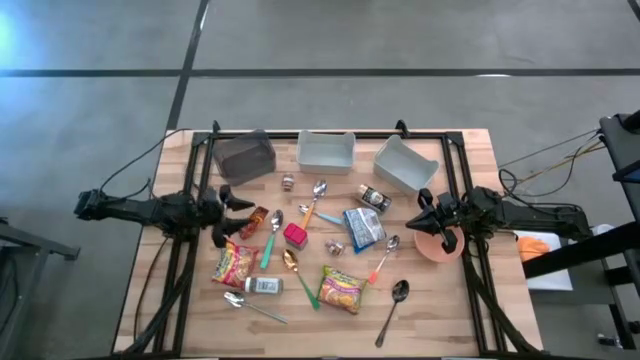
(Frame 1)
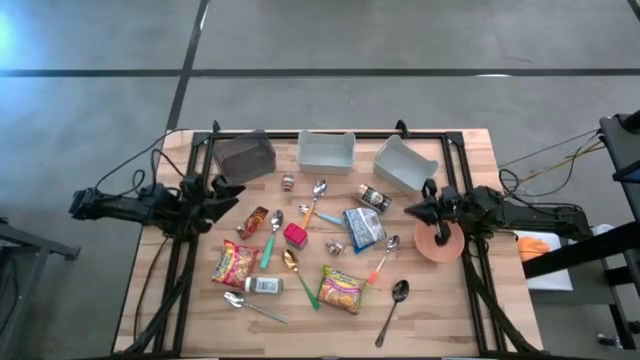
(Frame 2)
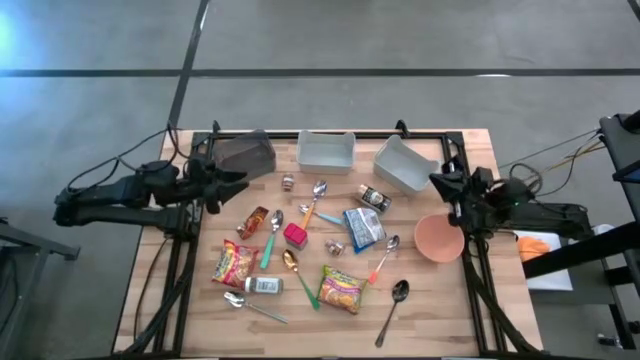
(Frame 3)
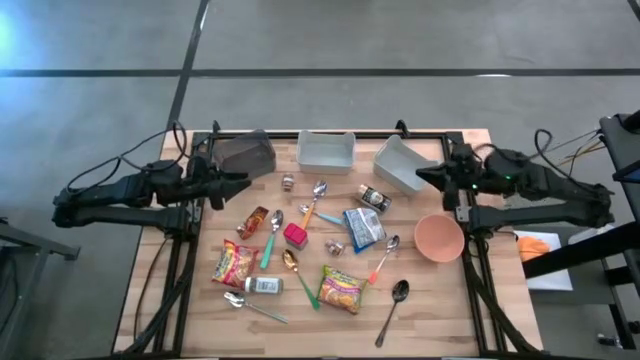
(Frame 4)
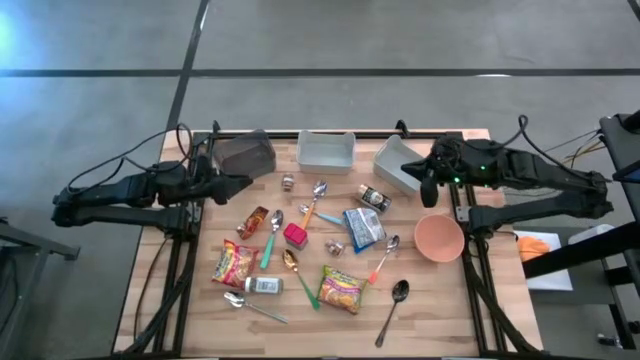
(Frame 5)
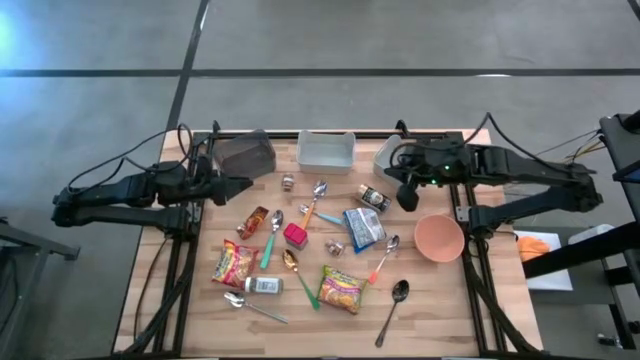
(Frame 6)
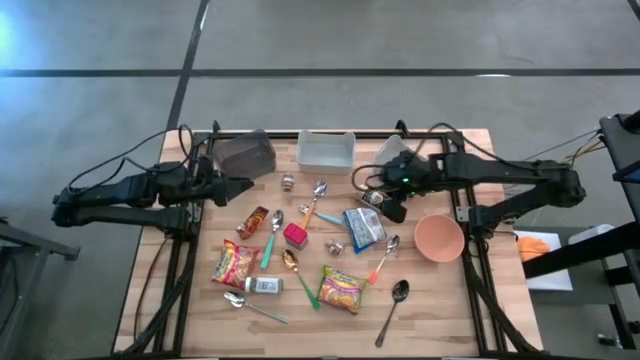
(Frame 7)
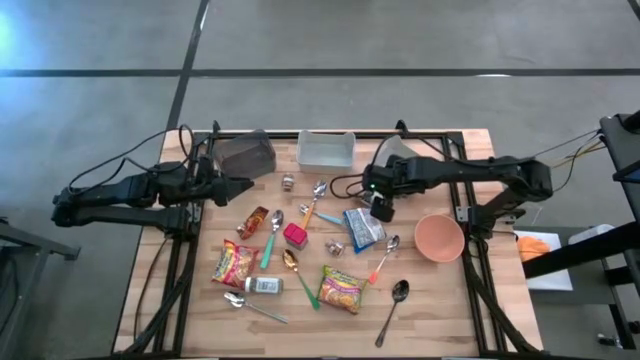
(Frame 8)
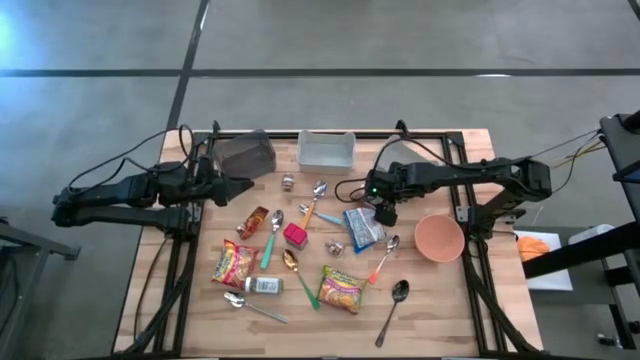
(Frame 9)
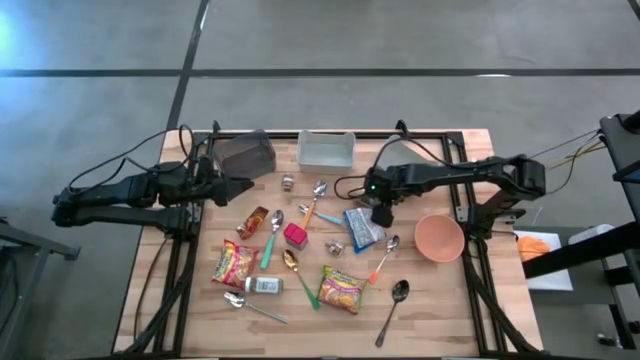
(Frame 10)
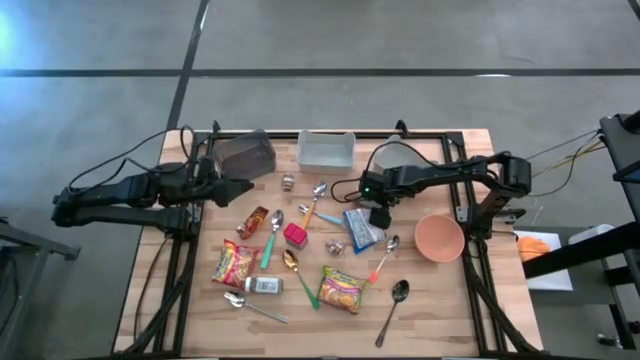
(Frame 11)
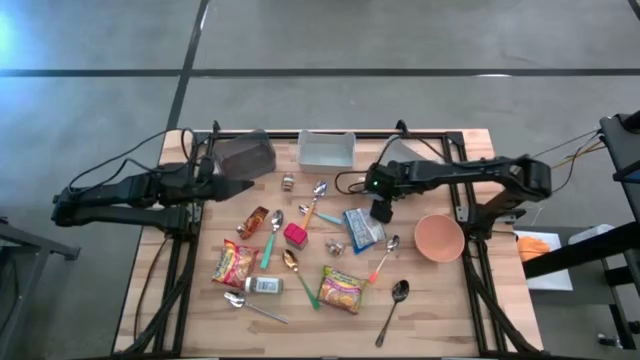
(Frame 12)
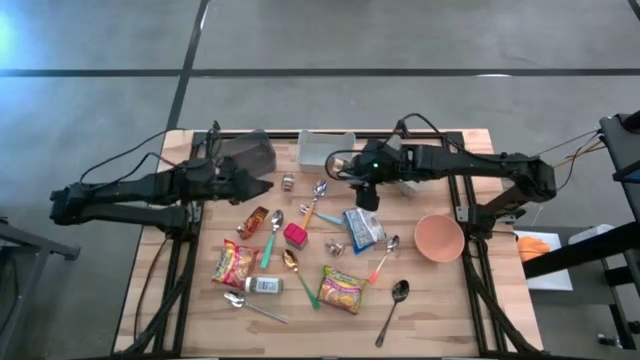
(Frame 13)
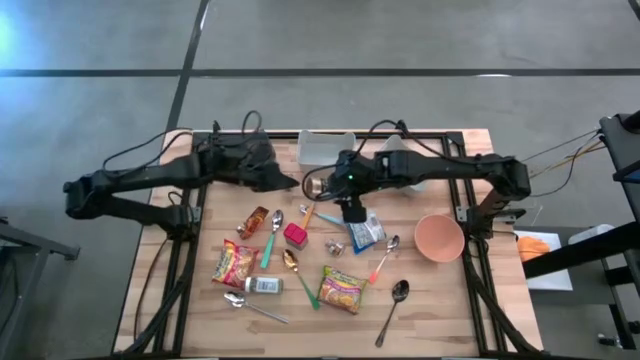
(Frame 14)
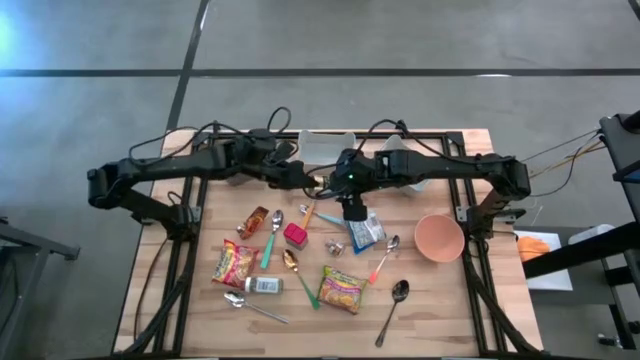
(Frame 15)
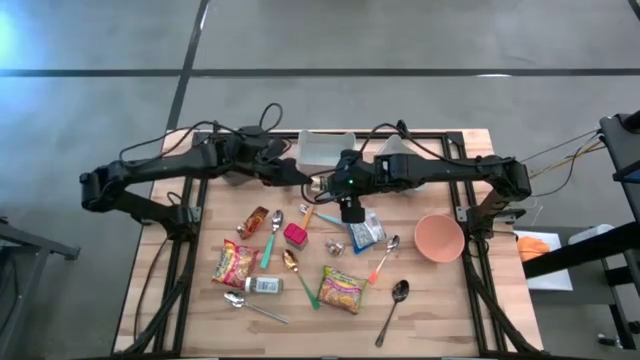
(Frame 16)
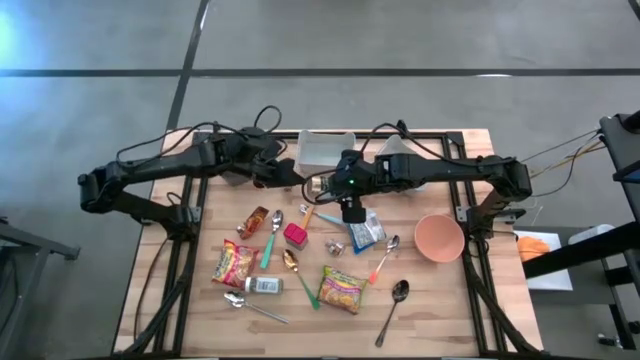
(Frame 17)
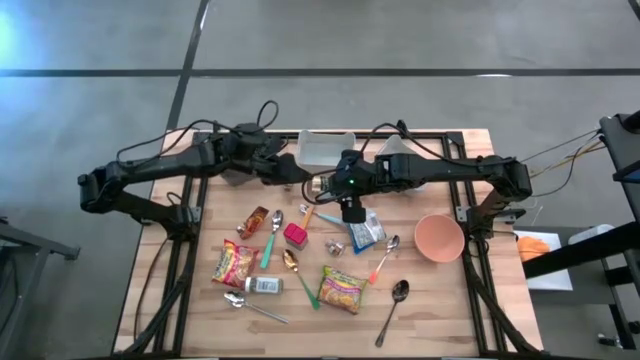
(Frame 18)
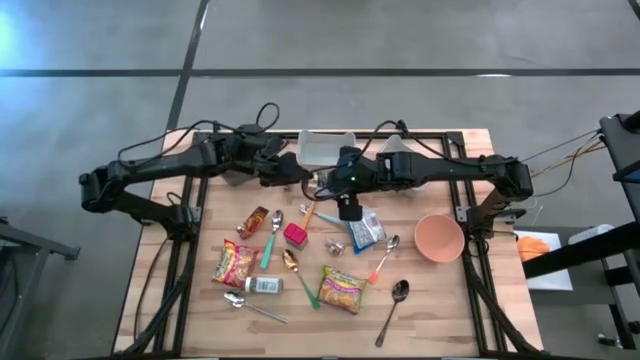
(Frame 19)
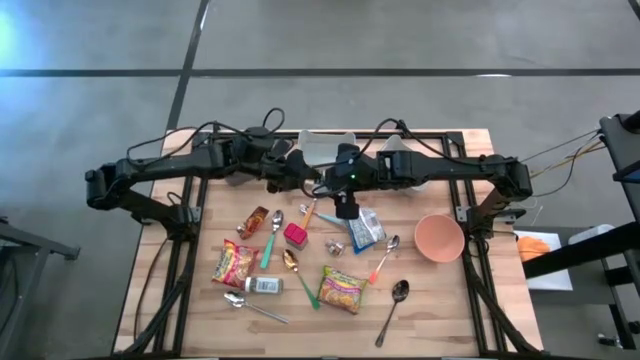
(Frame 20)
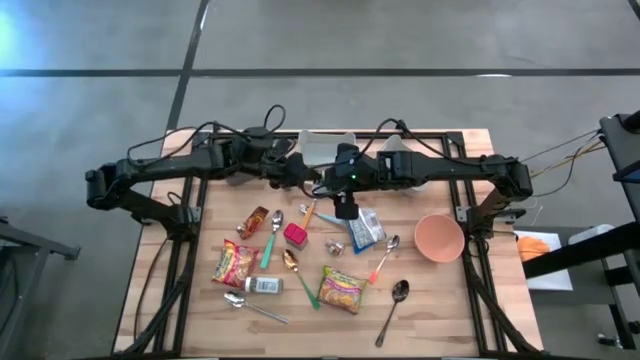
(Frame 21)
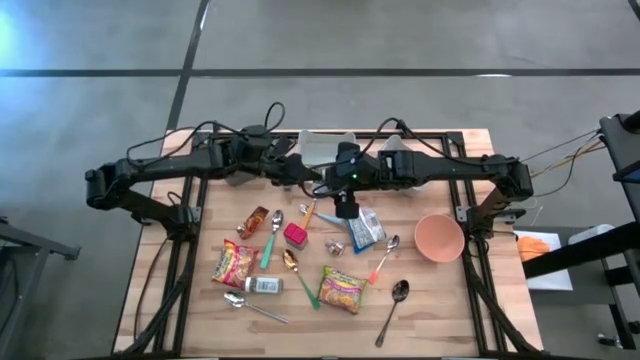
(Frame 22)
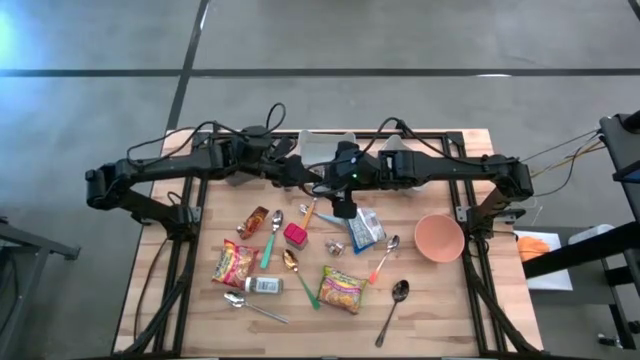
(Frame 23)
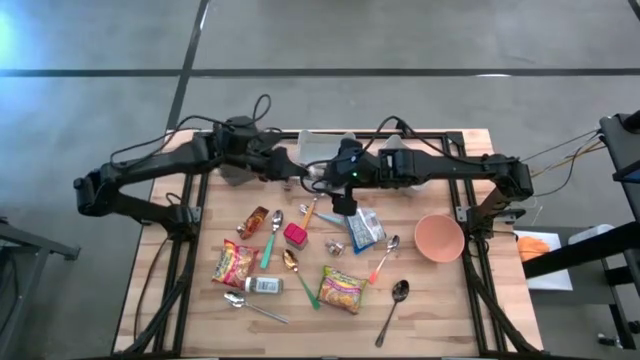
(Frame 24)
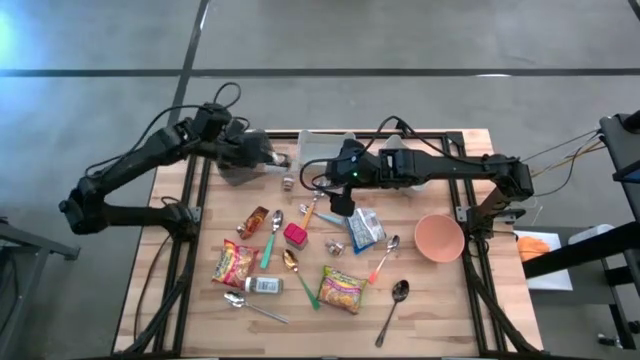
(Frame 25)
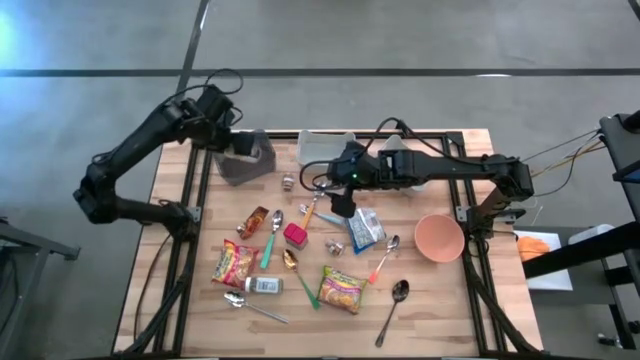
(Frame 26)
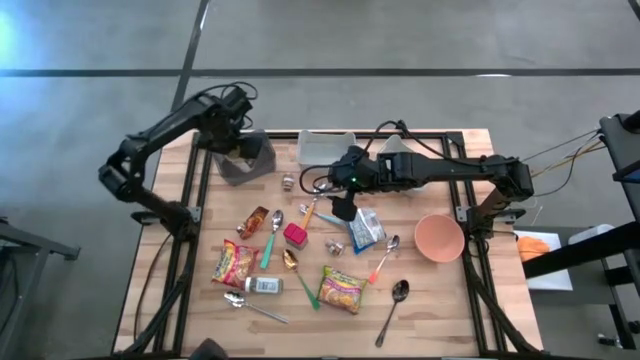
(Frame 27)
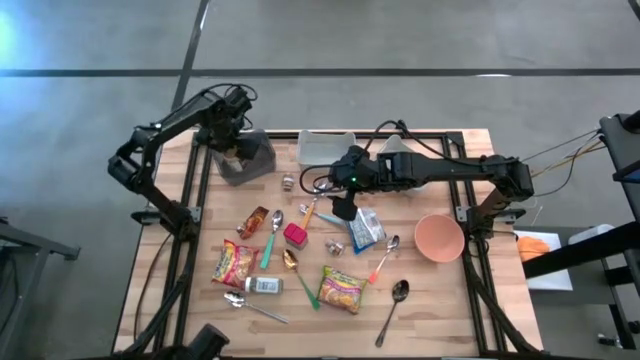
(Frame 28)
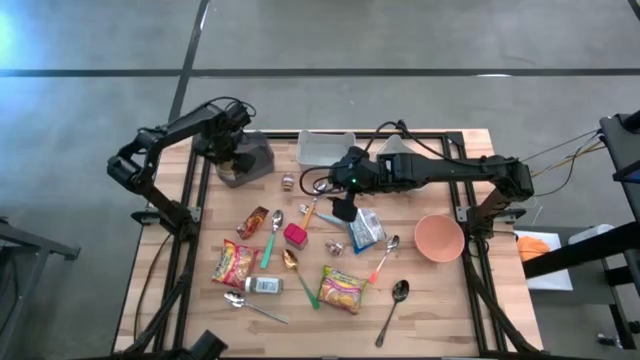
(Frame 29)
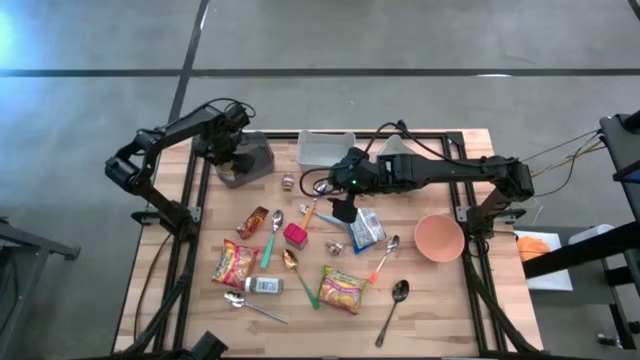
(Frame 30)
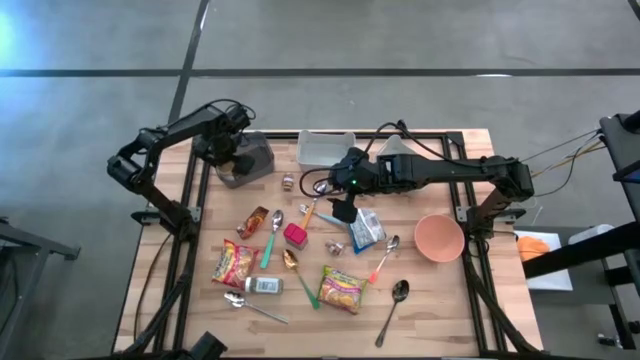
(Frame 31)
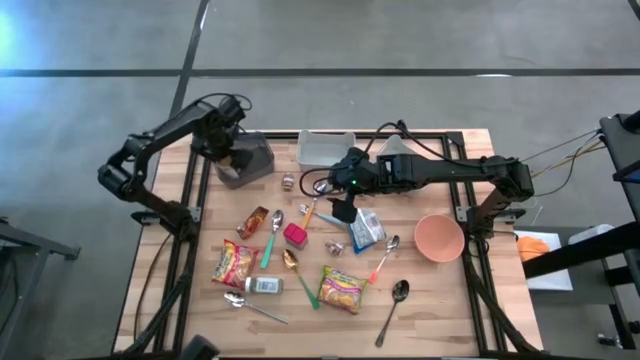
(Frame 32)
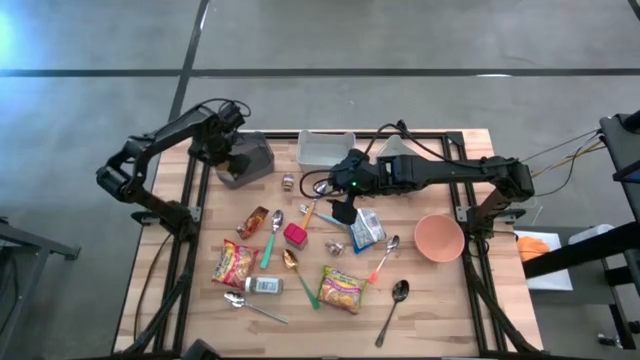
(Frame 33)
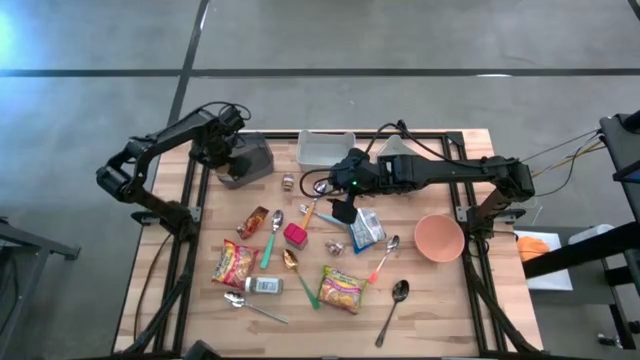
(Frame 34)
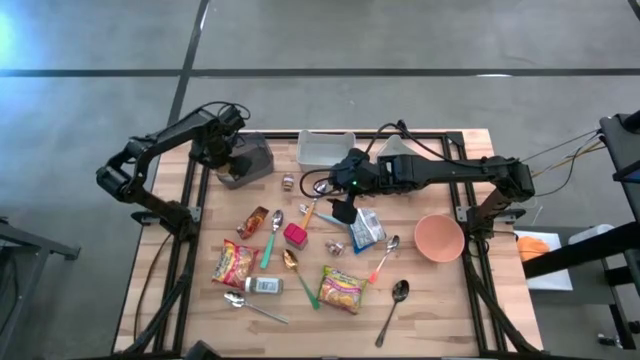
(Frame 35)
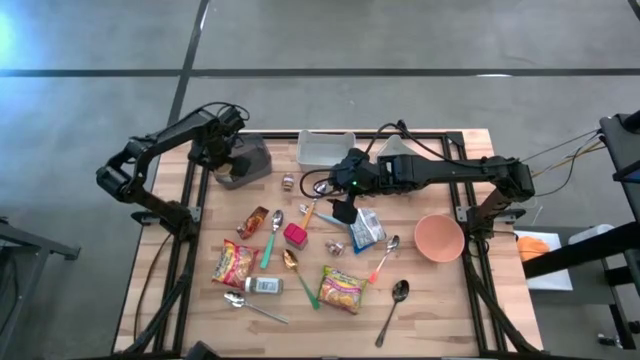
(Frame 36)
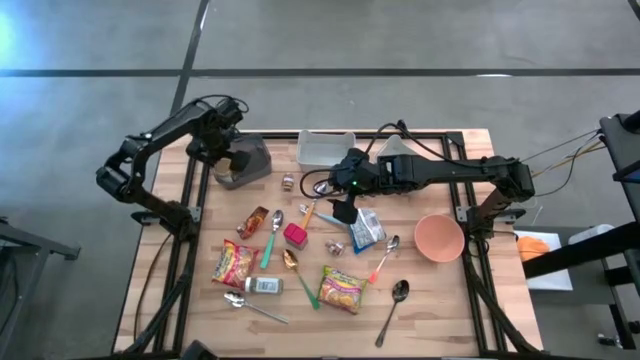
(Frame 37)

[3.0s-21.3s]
Put the gold seasoning bottle into the black bin
